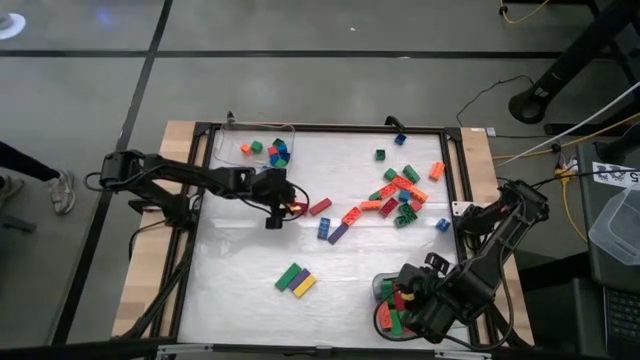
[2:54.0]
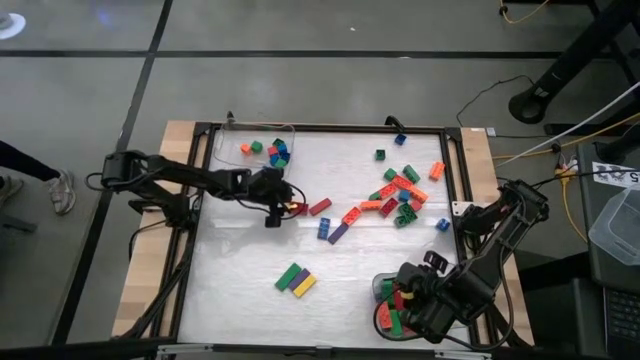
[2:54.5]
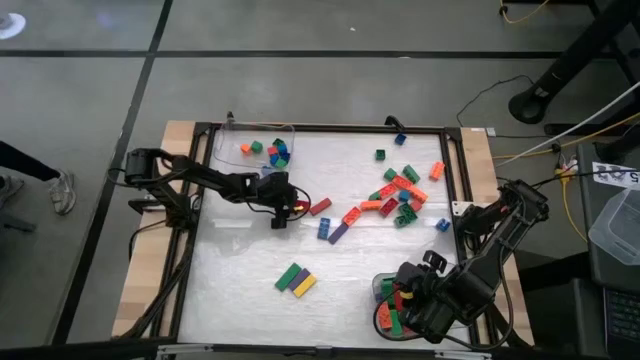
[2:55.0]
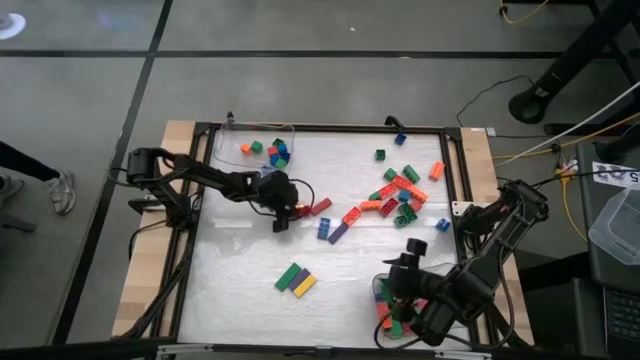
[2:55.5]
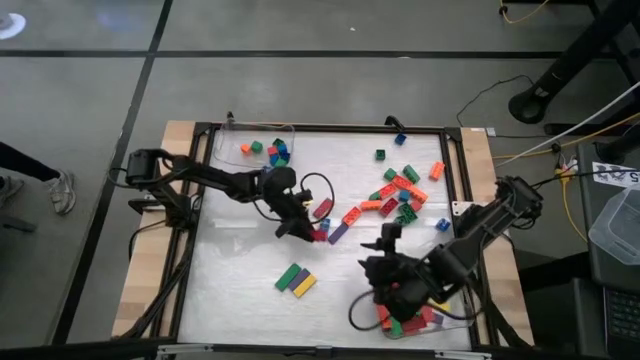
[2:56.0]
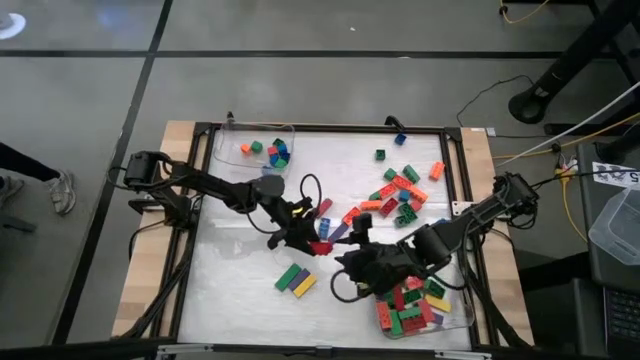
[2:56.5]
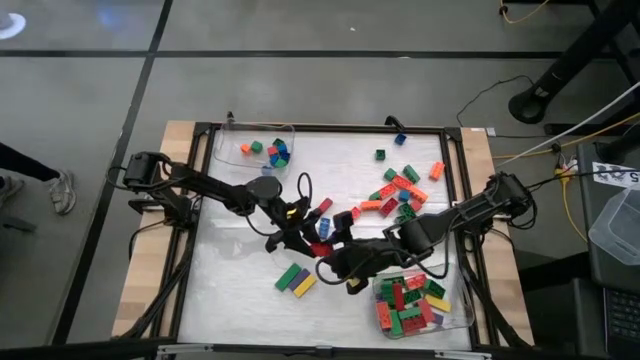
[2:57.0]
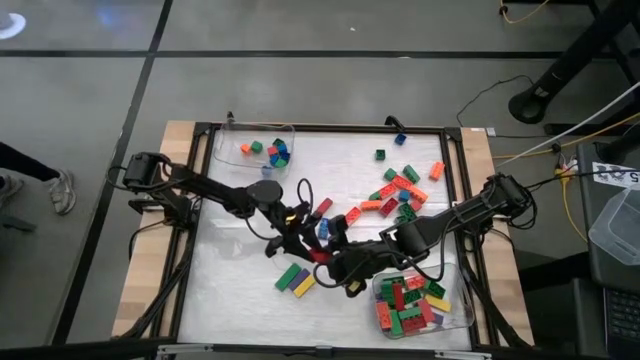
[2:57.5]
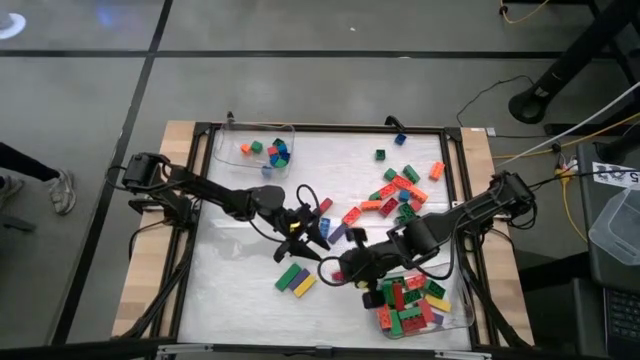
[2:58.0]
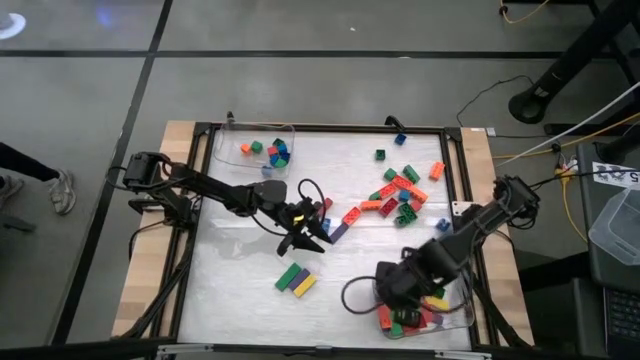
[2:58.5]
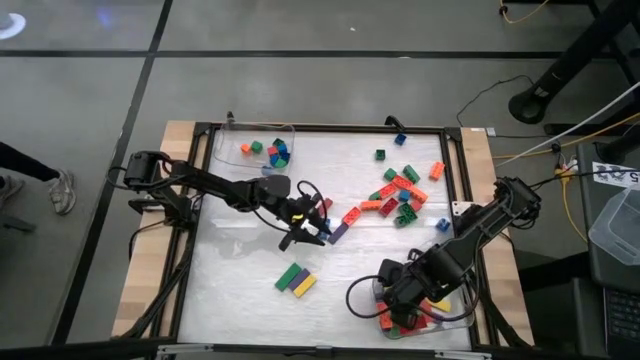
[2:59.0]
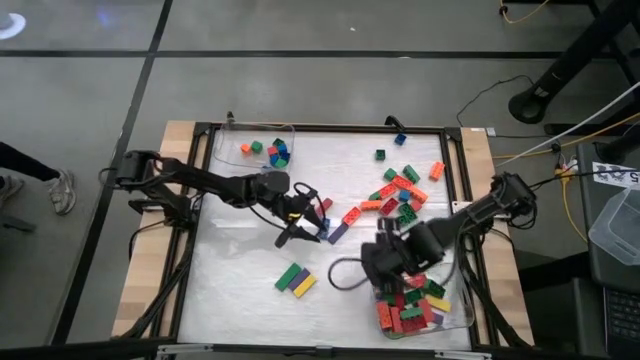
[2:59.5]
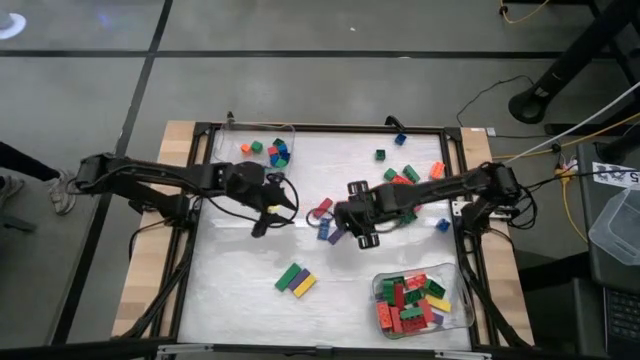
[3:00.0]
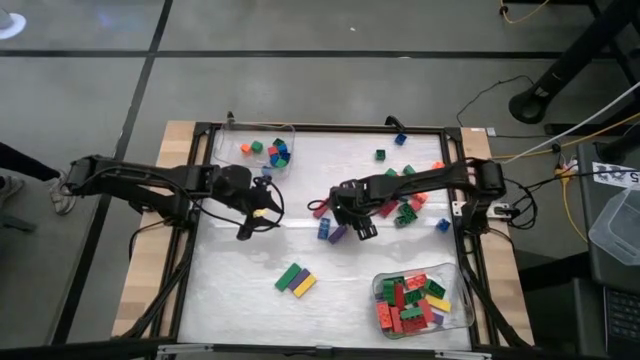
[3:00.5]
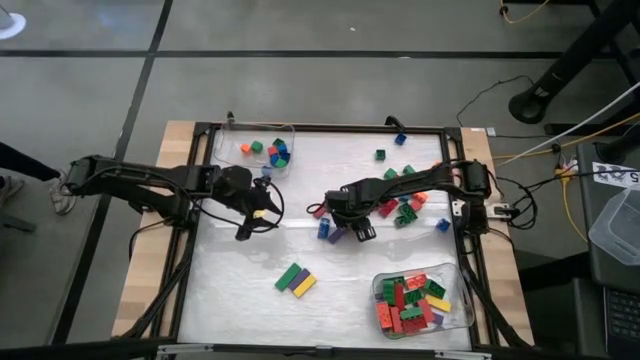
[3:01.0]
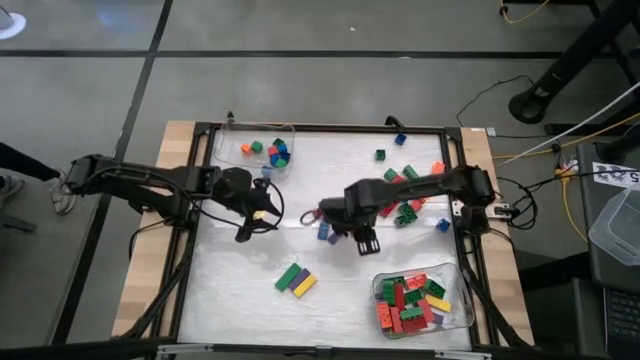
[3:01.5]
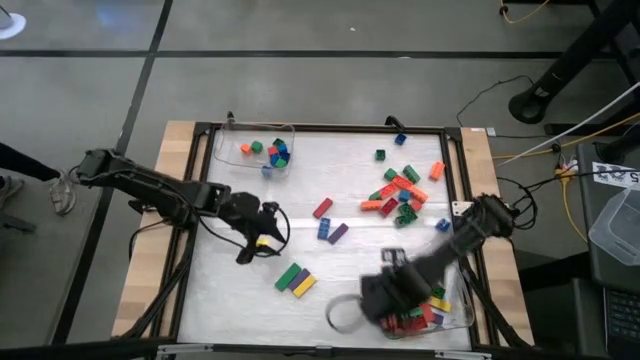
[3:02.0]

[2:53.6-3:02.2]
Task: Sort blocks by size
Put the rectangular red game piece into the bottom transparent bin

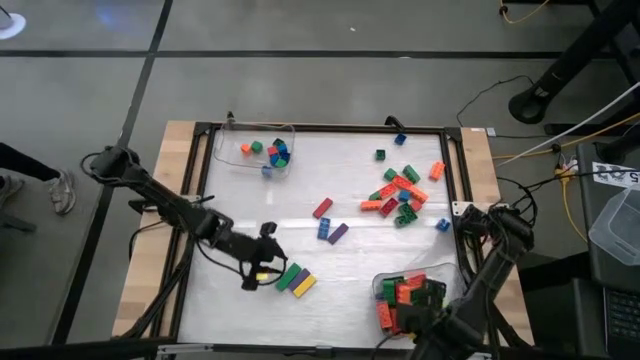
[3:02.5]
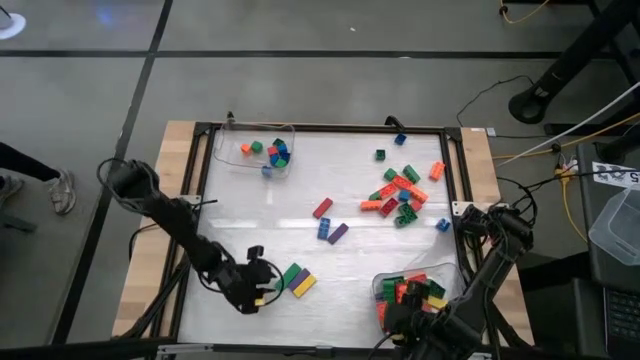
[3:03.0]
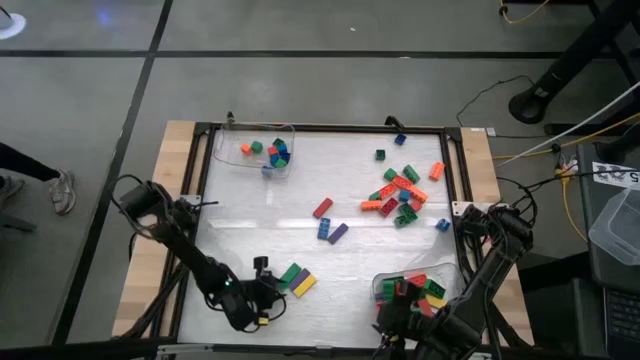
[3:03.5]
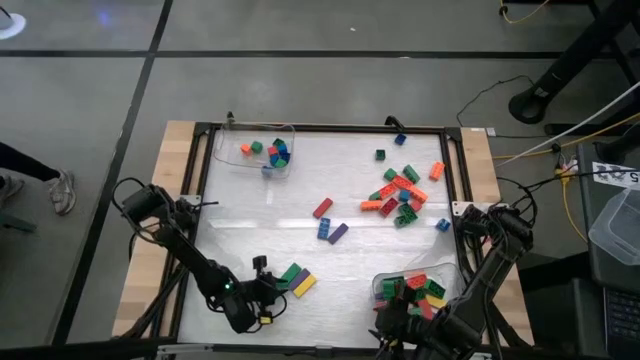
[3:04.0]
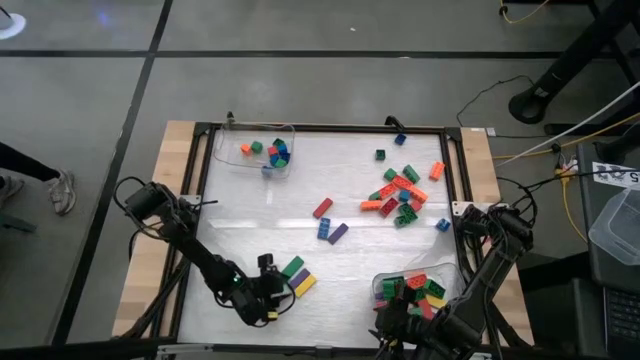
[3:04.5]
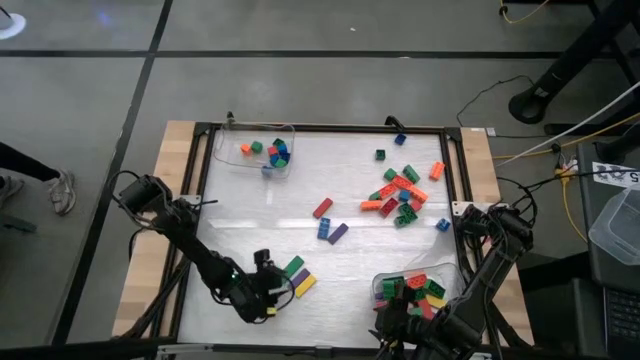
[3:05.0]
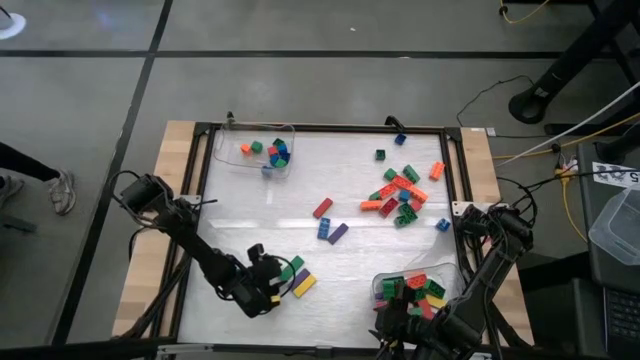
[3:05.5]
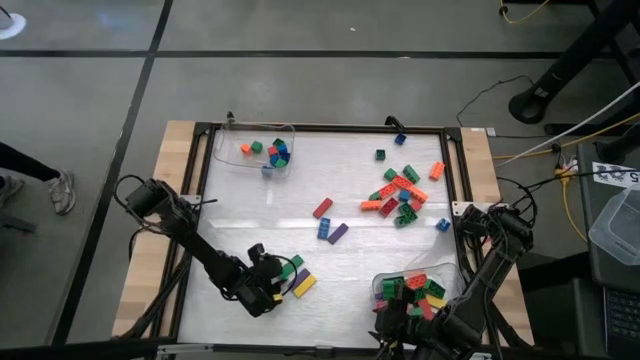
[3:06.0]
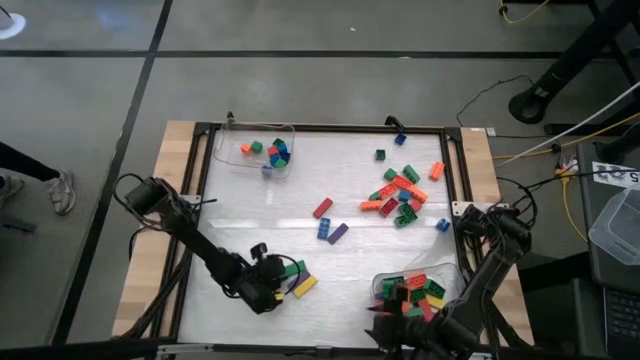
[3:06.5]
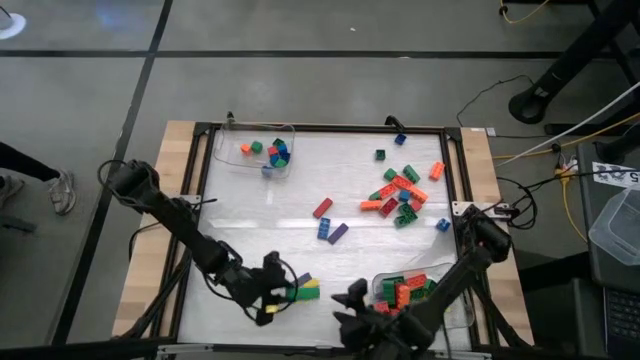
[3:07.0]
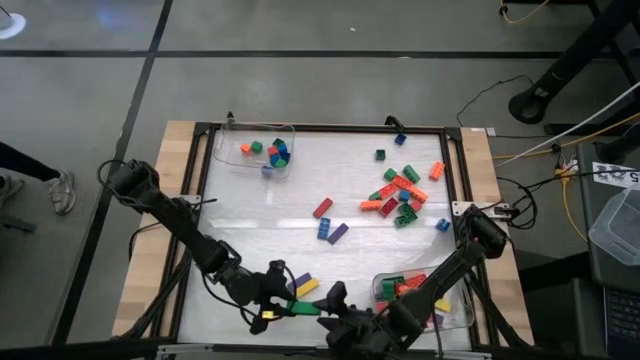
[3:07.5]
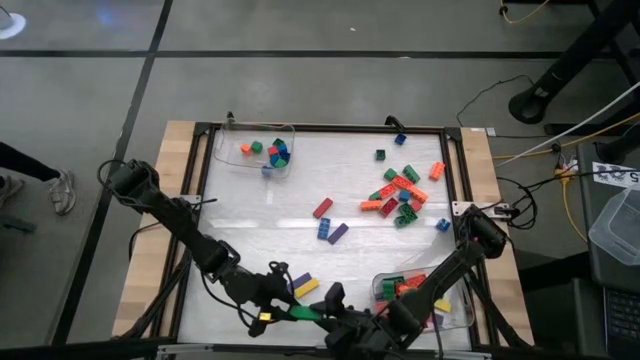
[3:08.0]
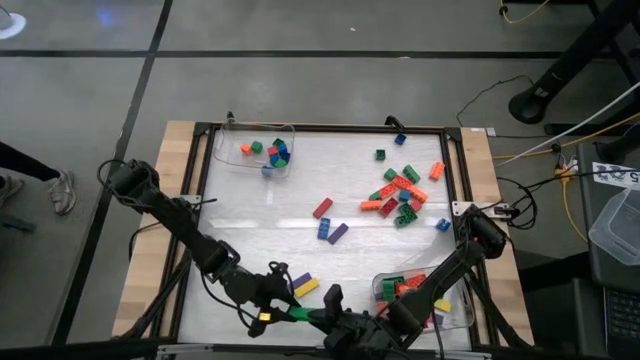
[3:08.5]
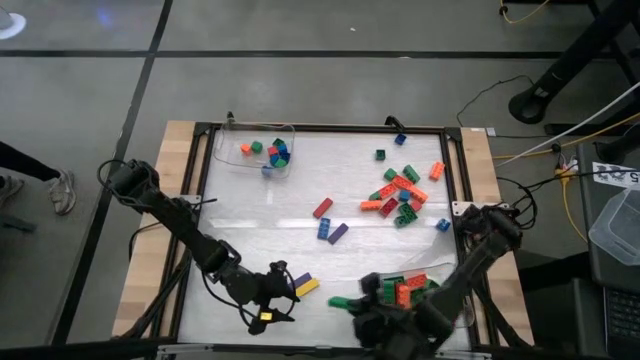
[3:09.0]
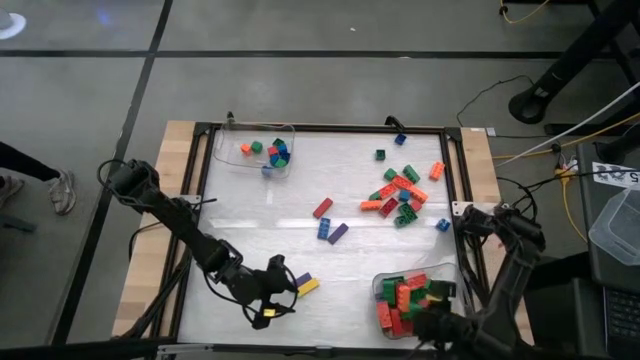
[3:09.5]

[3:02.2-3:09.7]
Put the rectangular green block into the bottom transparent bin

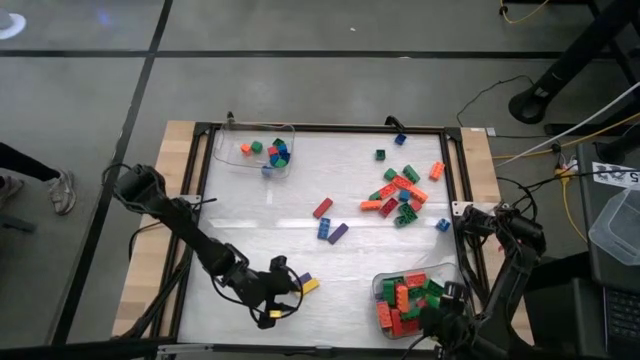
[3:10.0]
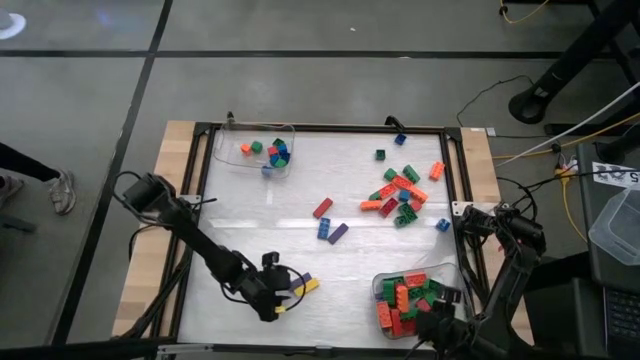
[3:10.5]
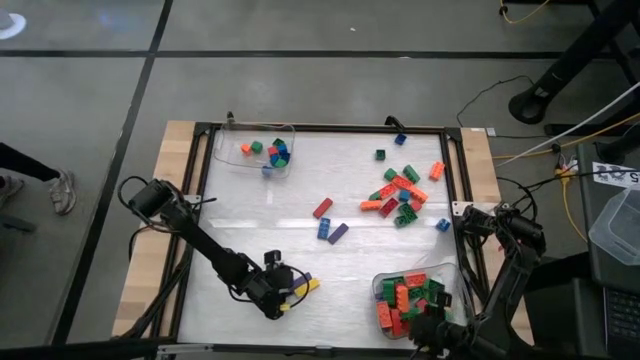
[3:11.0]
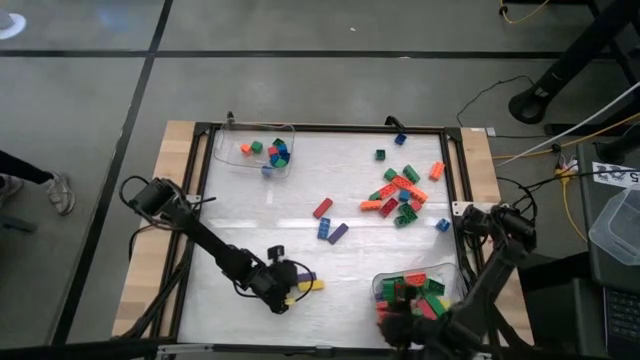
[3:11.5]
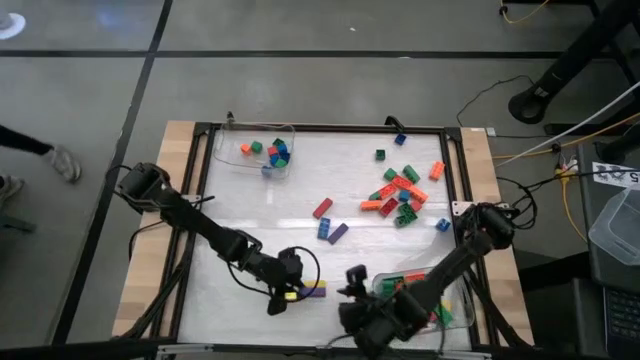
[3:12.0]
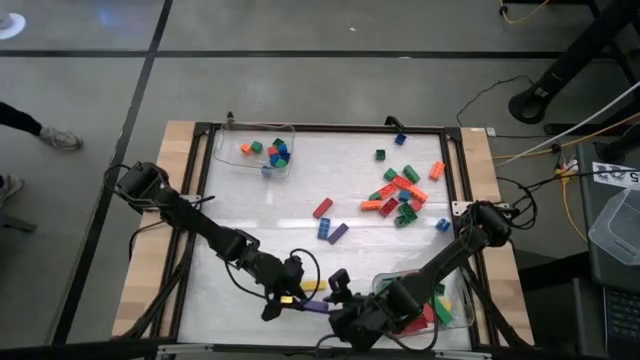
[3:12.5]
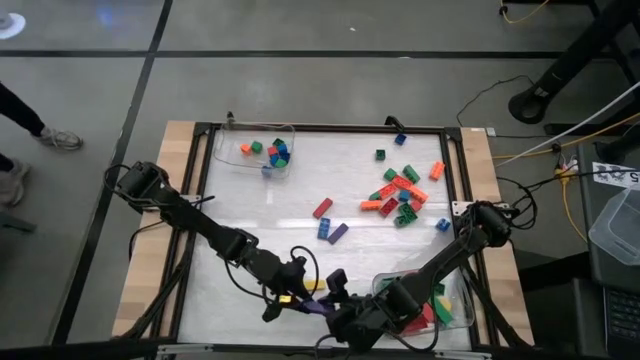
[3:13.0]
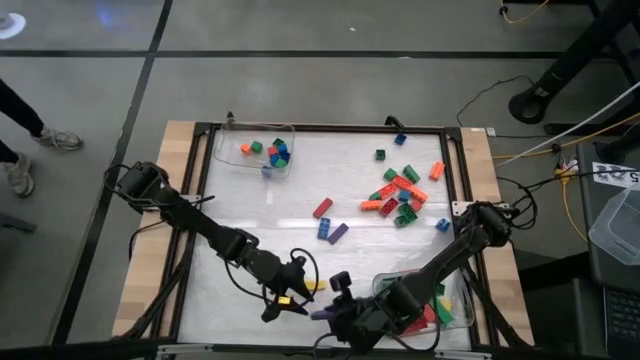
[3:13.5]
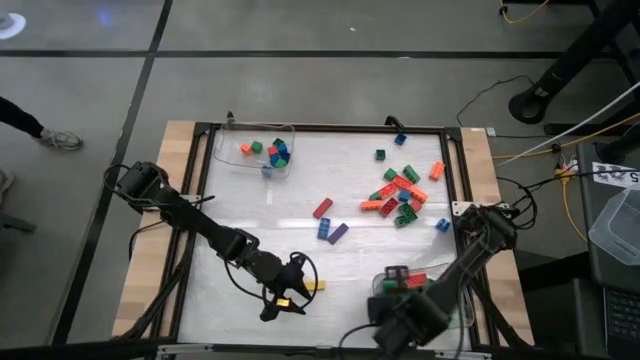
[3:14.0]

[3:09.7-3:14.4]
Put the rectangular violet block into the bottom transparent bin

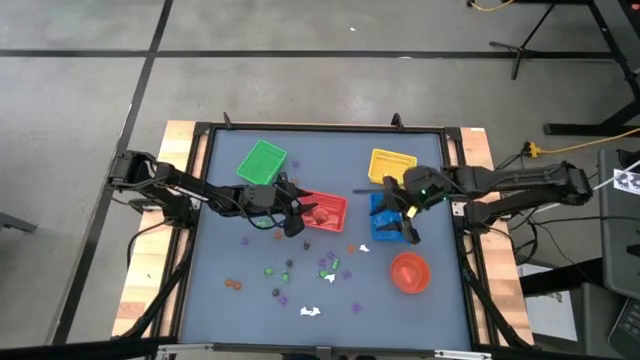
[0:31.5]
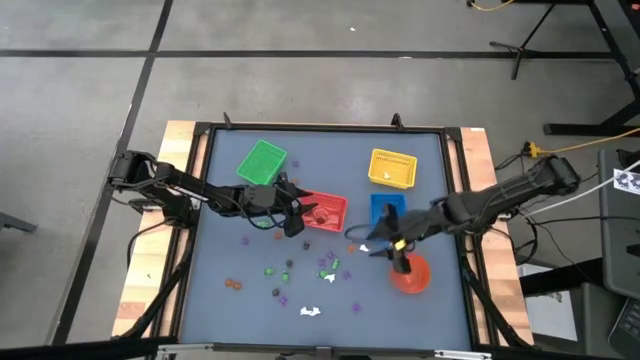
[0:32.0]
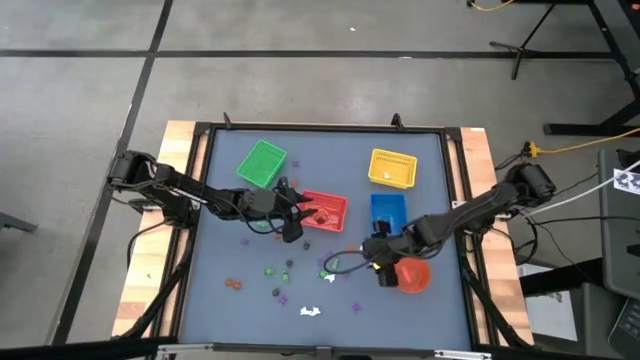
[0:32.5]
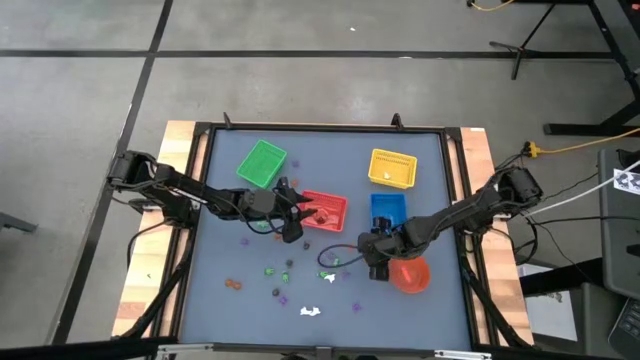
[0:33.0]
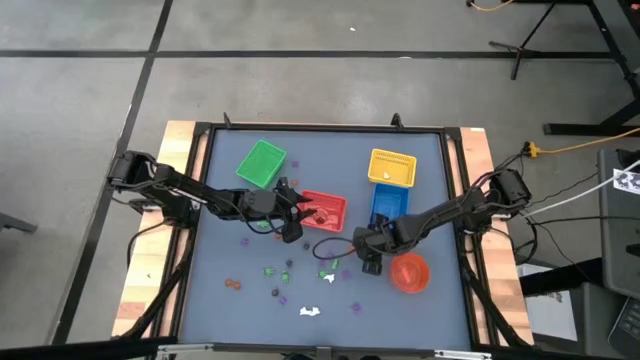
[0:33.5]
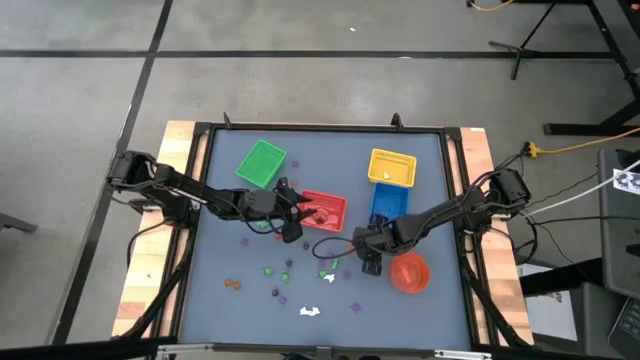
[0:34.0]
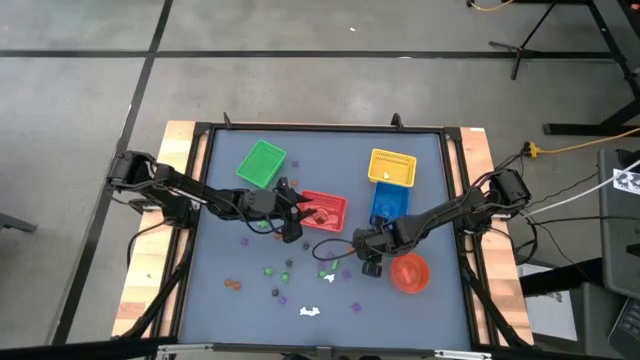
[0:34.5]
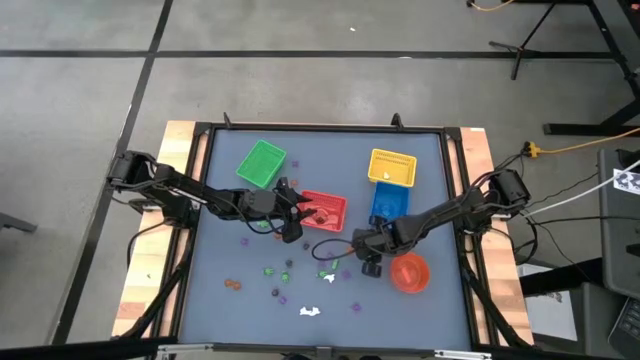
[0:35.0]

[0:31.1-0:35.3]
Task: Sort Halloween decoration
Put the white ghost toy into the yellow bin
